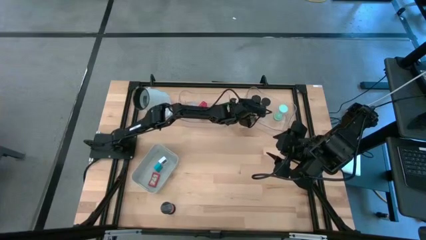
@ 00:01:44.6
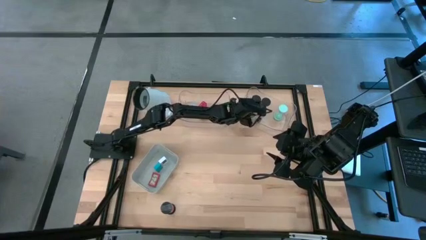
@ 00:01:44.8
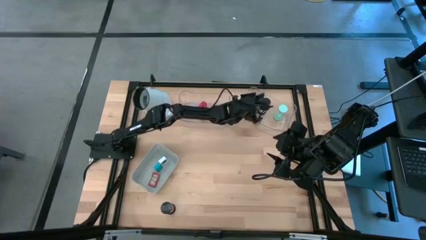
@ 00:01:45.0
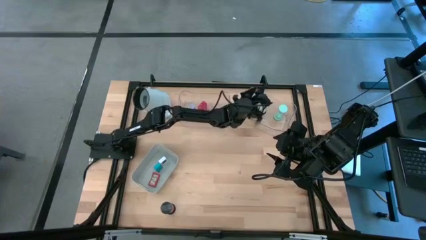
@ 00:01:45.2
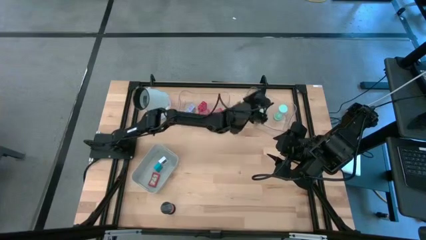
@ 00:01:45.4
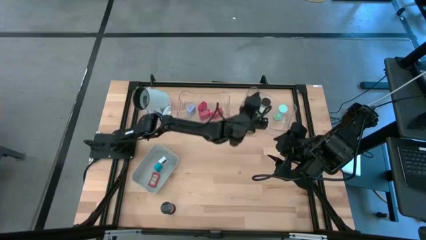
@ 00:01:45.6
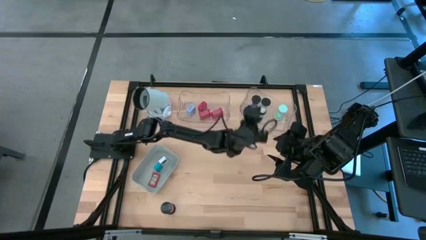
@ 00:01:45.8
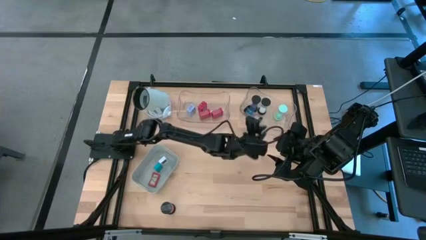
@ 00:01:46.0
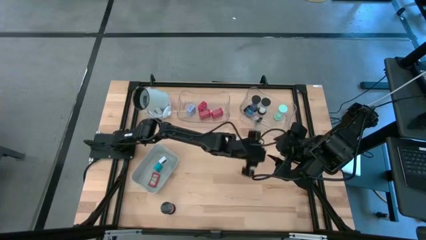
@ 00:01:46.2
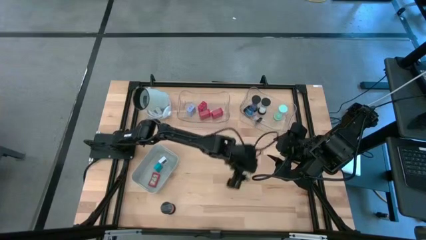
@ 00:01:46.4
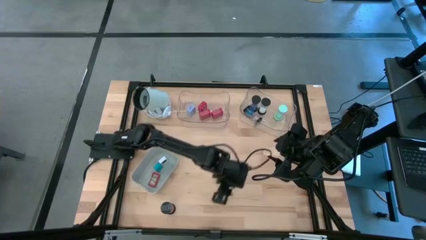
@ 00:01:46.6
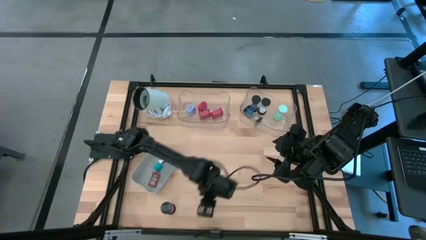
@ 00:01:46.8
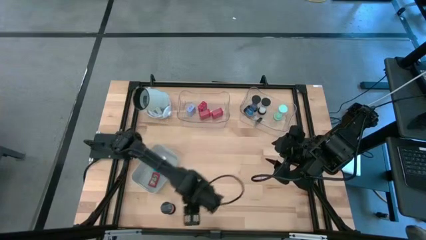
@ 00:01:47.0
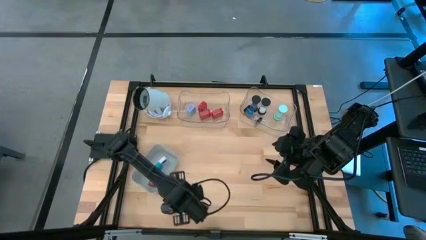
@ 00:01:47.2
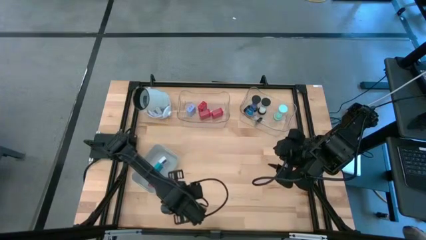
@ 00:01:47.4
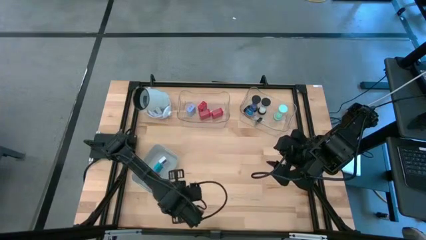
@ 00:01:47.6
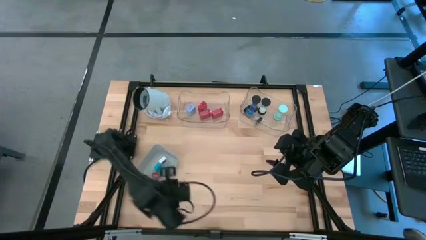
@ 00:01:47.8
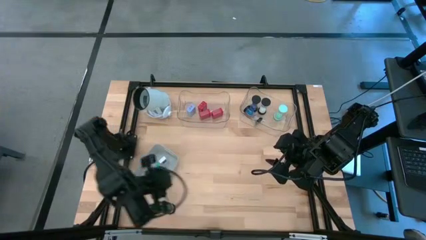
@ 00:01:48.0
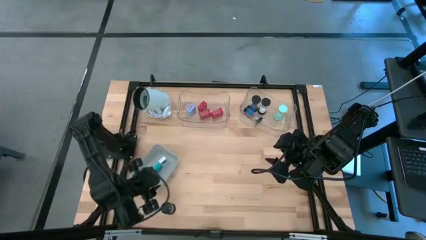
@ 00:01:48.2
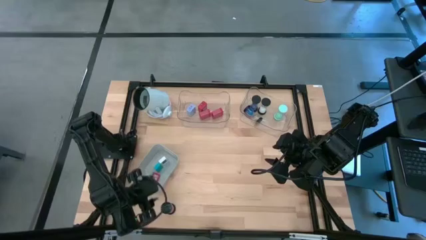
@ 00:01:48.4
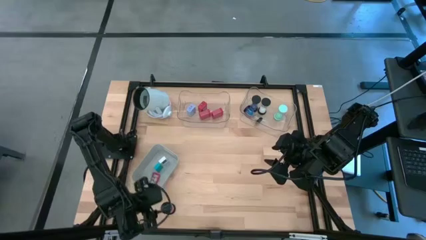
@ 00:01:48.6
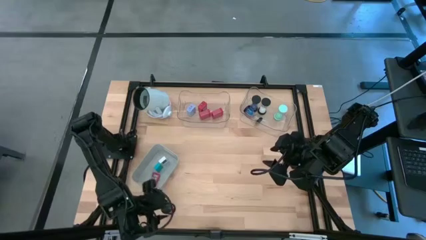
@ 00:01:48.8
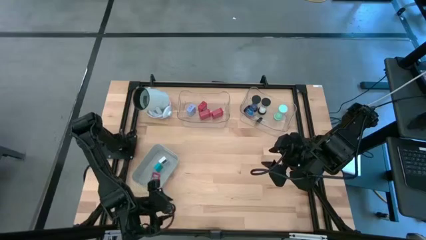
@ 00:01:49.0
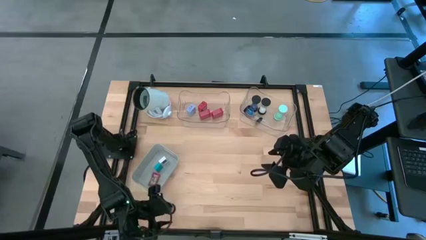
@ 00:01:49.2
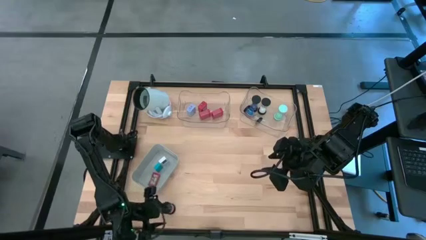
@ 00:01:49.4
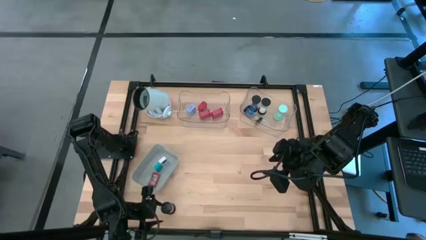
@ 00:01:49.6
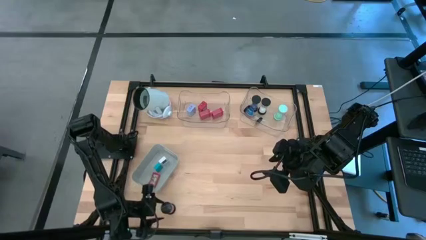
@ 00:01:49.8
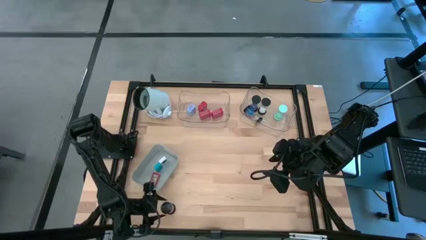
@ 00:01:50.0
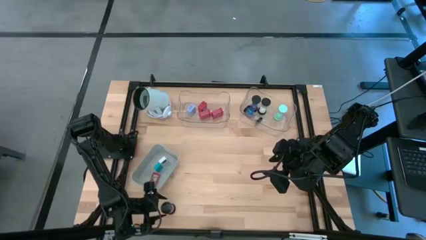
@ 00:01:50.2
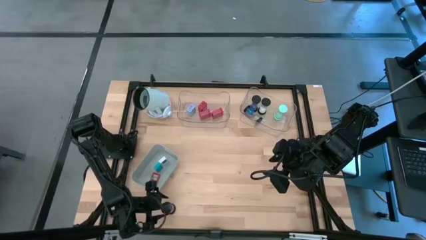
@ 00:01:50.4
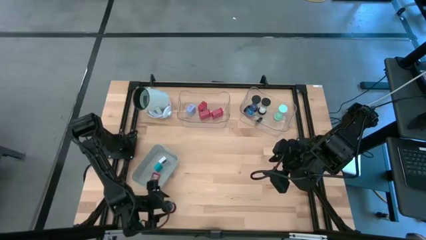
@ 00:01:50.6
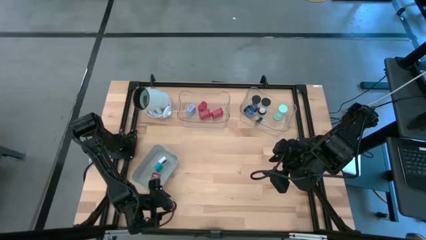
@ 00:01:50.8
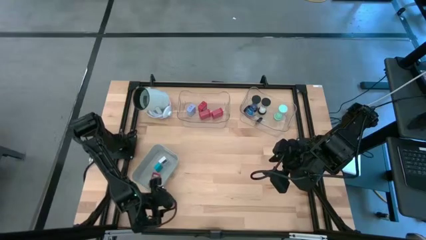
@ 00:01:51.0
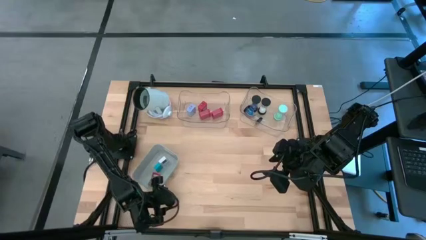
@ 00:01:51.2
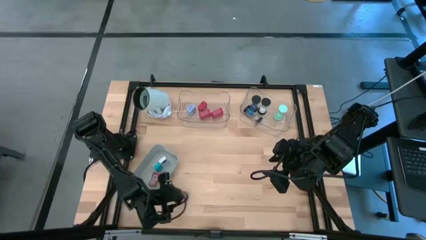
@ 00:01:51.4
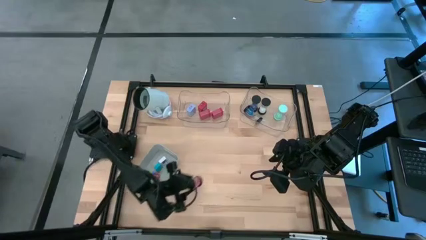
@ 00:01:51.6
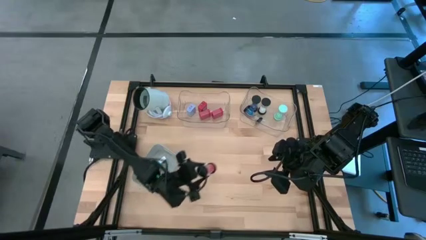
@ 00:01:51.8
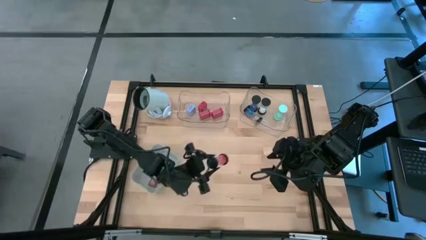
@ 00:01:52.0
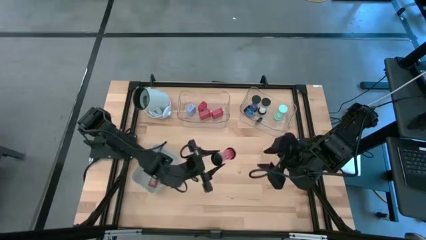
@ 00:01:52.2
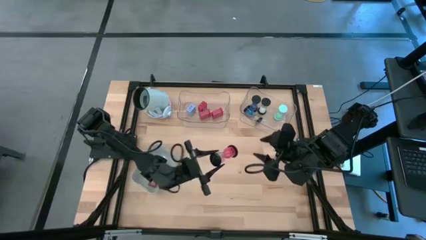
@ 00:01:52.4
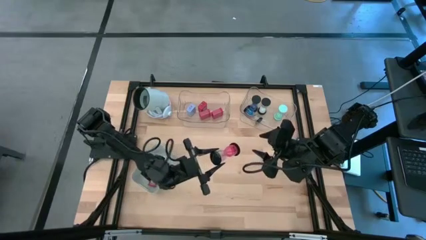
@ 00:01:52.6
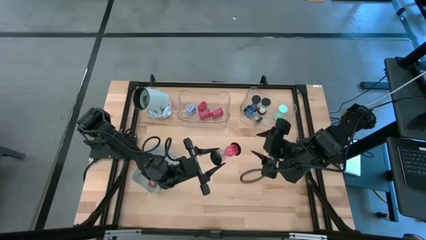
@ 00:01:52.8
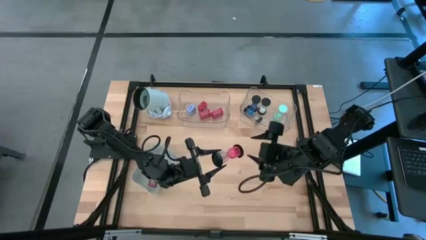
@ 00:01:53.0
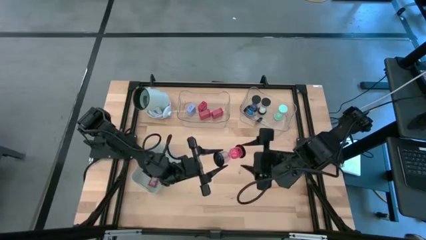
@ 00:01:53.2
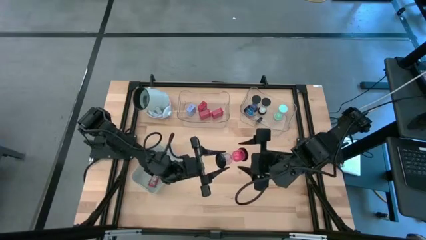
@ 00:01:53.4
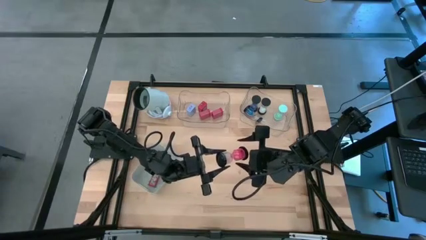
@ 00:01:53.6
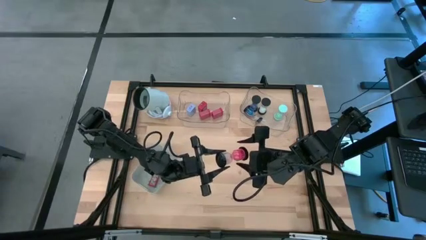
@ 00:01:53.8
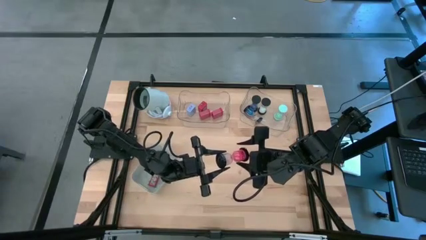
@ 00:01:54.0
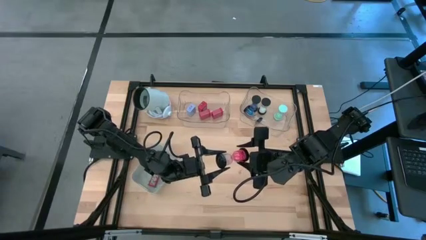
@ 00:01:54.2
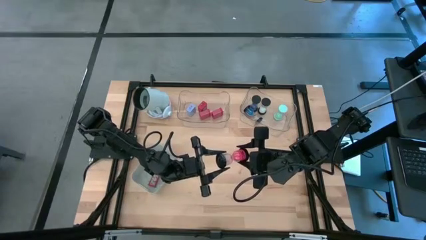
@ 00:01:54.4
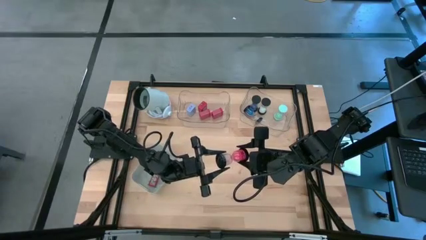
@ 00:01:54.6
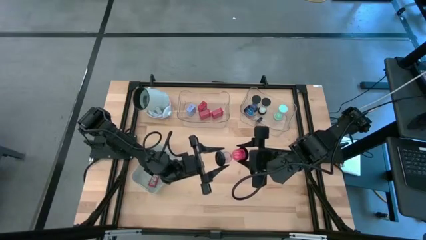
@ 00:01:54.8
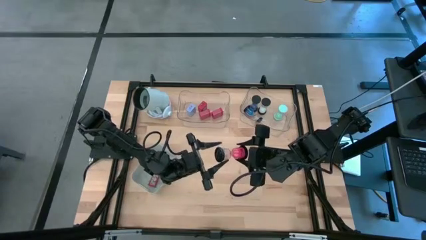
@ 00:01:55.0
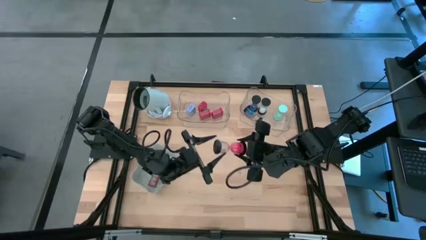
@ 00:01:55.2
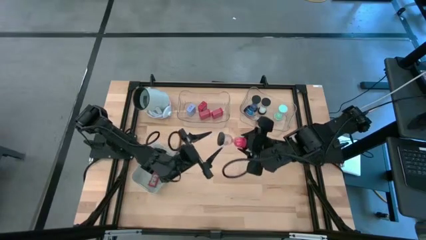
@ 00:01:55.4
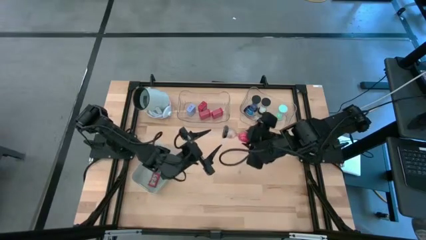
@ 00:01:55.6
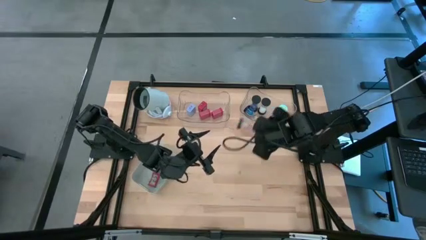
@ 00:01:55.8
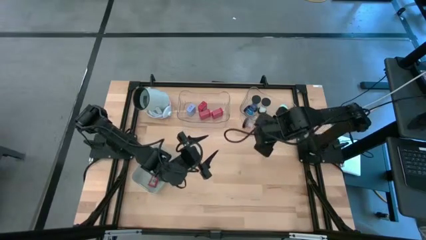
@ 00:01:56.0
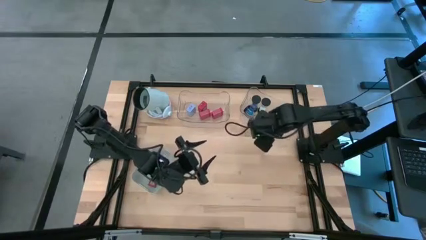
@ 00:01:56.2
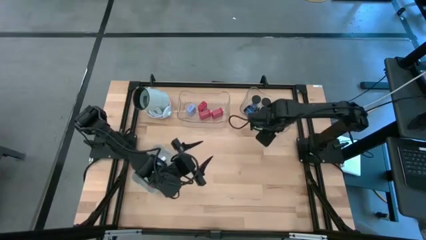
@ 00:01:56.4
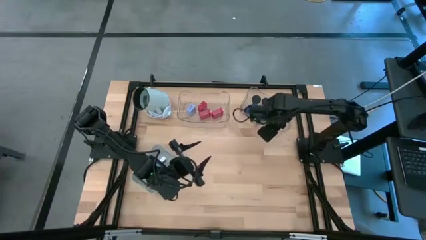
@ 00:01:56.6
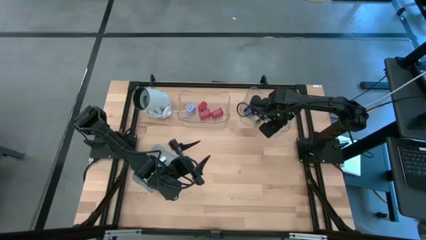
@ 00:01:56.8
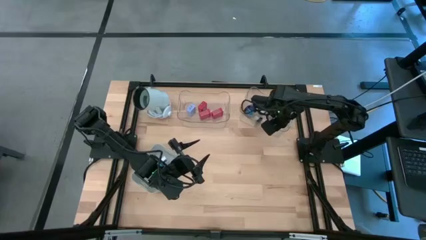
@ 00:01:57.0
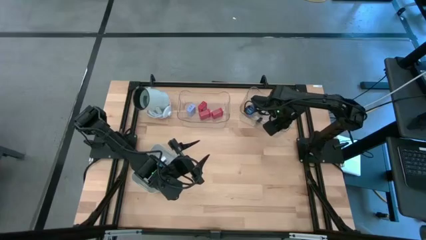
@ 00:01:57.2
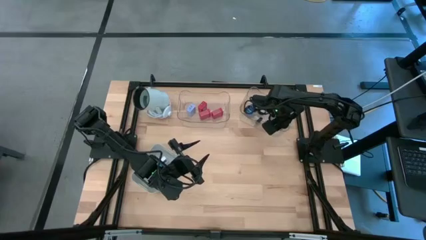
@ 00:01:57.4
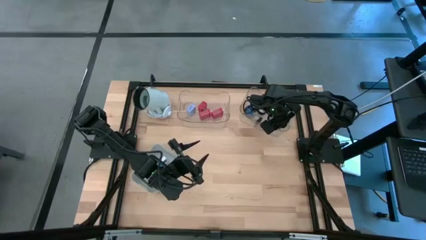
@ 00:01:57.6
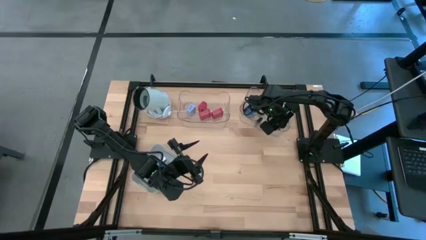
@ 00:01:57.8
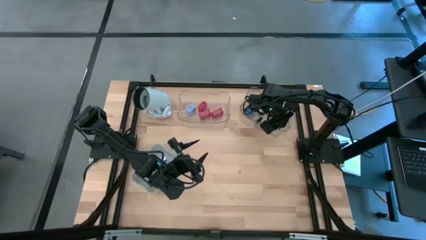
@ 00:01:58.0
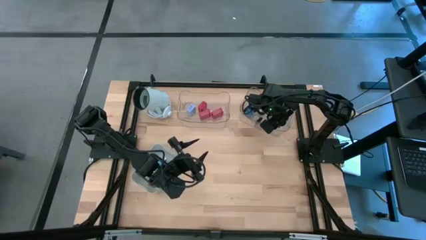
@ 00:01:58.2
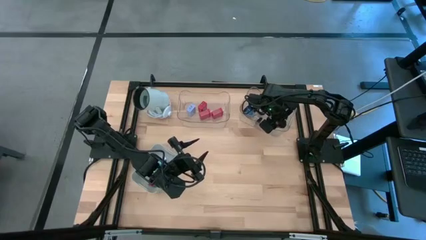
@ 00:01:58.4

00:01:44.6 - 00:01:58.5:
Task: Pick & Place Office items
Put the red hourglass into the right transparent bin

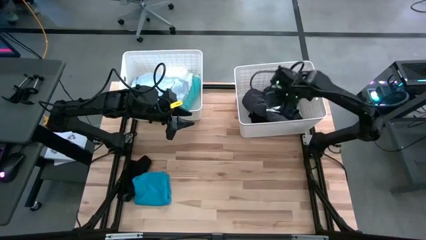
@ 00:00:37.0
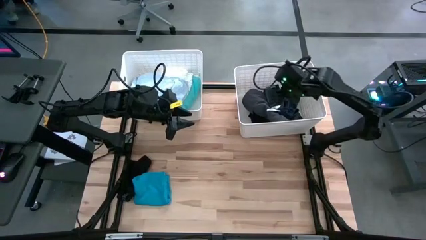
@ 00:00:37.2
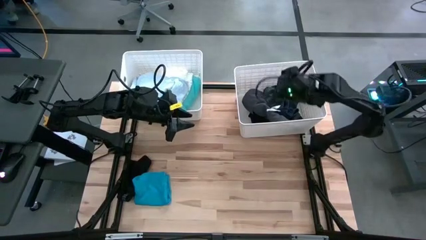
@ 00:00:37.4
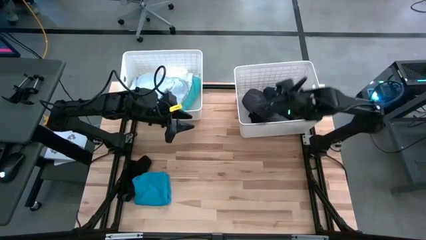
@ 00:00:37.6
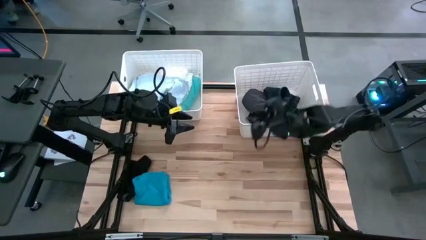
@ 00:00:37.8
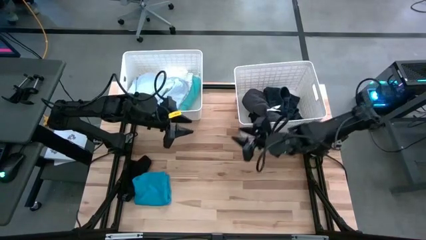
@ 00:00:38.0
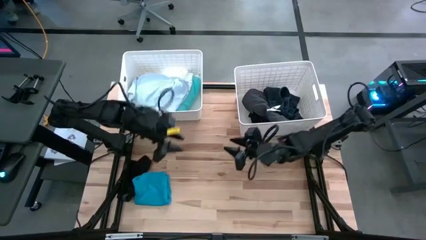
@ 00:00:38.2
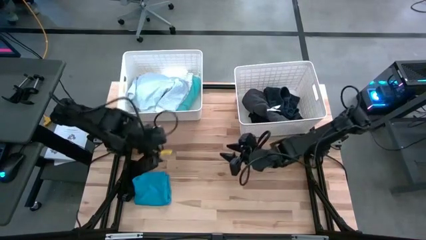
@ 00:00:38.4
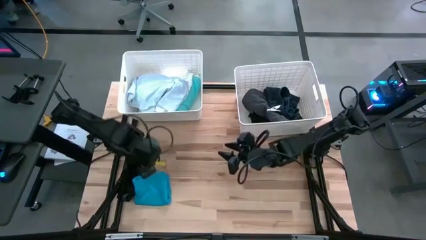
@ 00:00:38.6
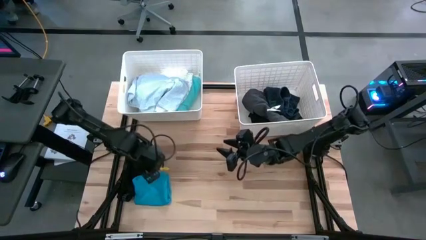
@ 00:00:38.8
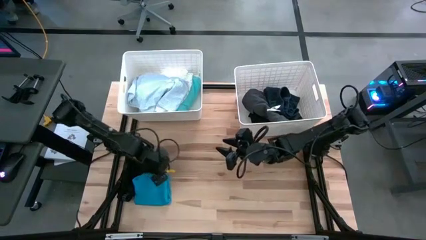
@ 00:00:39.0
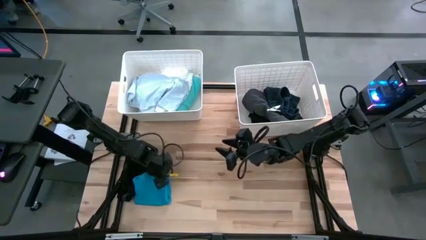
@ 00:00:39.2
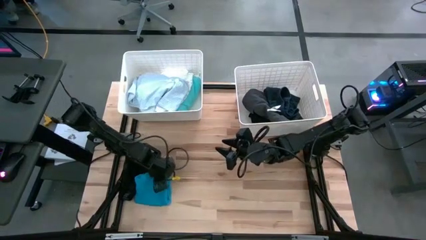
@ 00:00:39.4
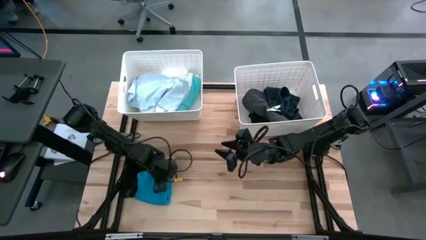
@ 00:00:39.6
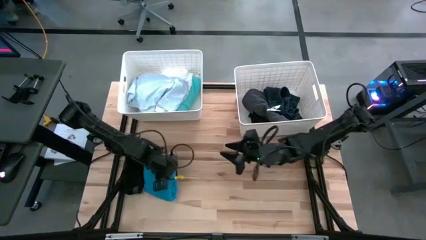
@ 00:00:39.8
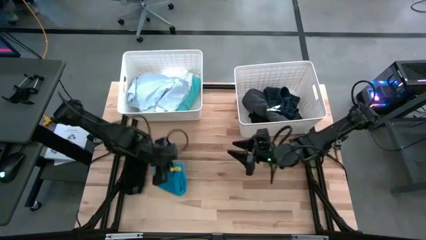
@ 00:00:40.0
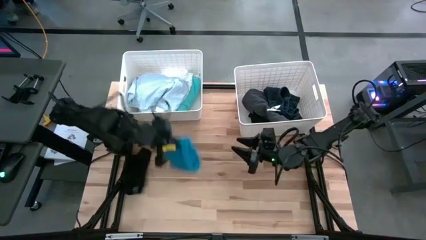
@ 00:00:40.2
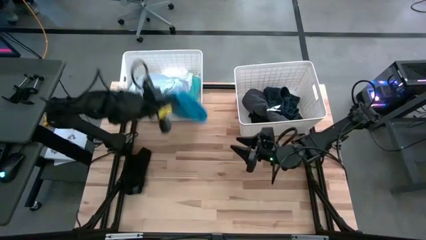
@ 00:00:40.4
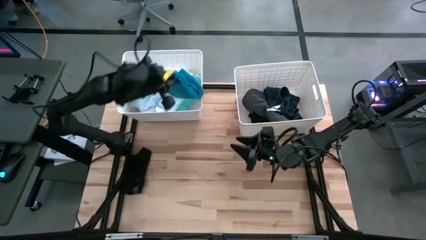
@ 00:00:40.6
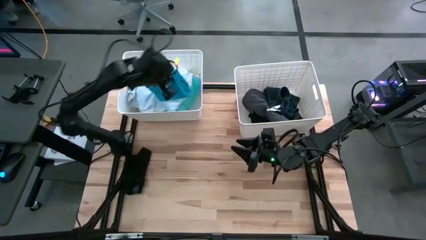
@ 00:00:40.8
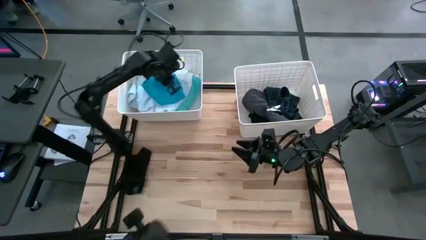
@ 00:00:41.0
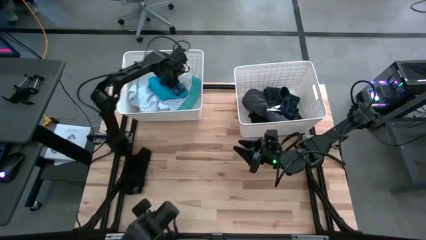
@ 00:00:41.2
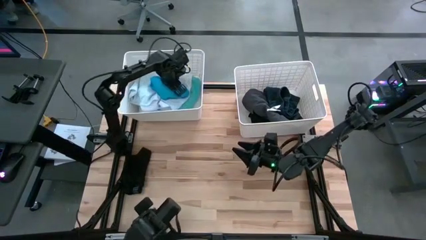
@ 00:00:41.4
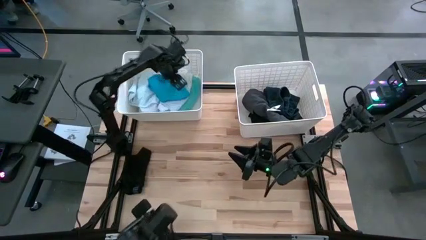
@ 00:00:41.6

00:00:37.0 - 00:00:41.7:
Task: Sort clothes
Put the blue shorts into the left white bin
